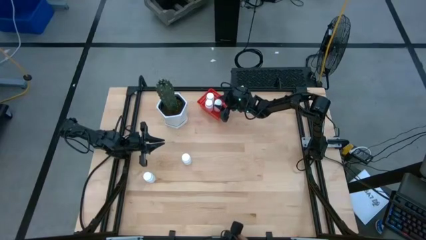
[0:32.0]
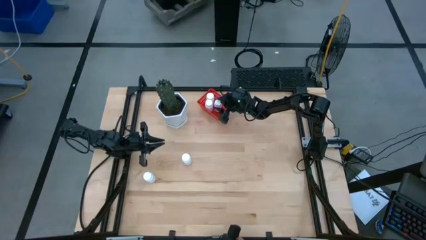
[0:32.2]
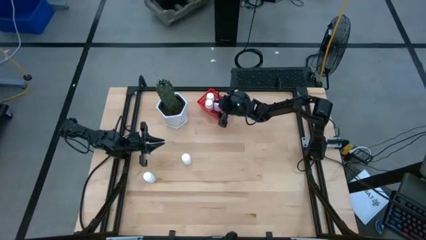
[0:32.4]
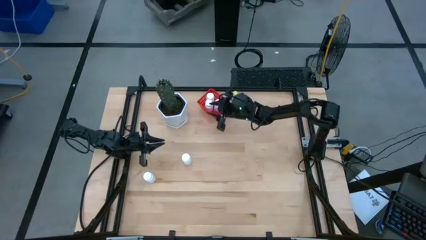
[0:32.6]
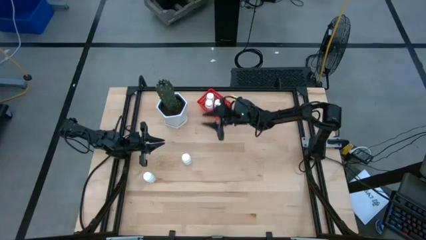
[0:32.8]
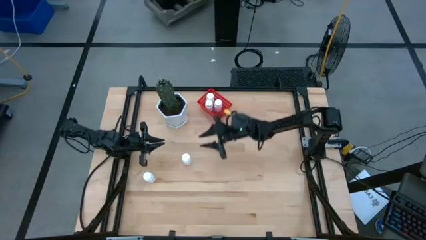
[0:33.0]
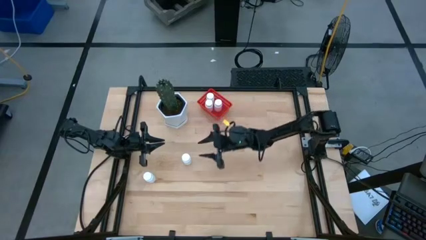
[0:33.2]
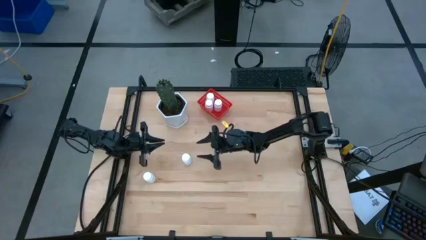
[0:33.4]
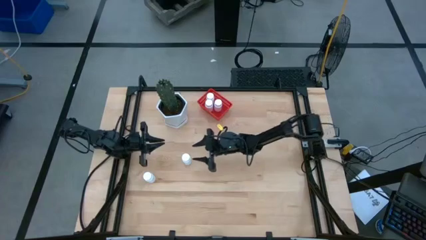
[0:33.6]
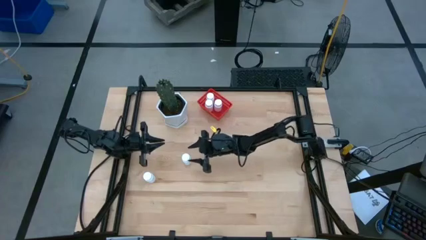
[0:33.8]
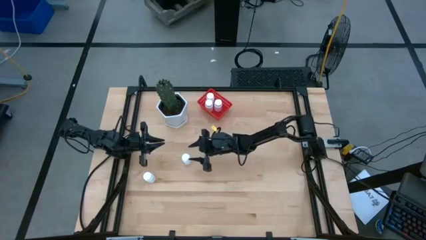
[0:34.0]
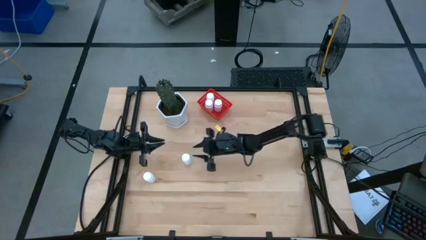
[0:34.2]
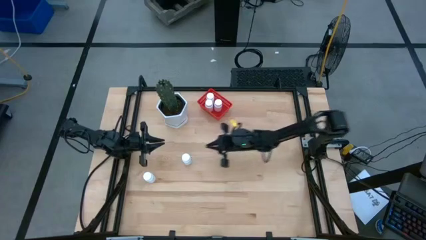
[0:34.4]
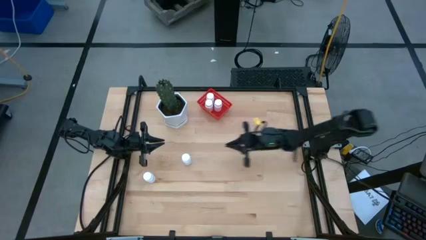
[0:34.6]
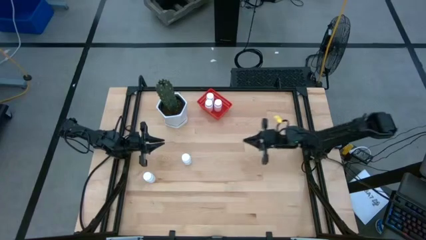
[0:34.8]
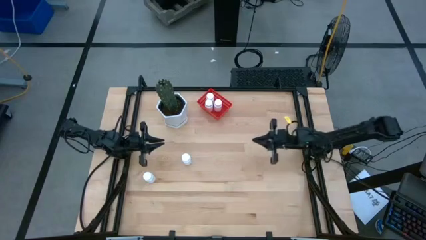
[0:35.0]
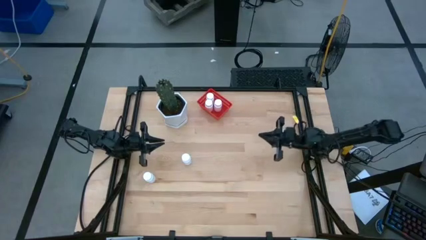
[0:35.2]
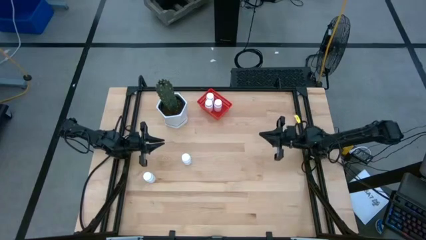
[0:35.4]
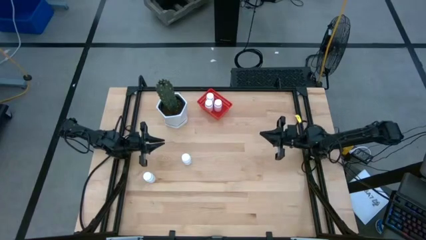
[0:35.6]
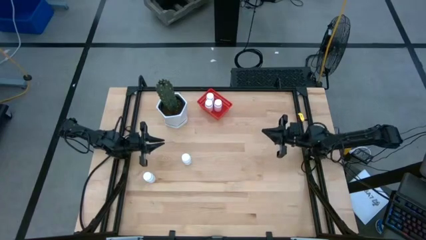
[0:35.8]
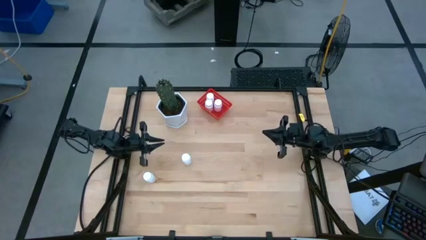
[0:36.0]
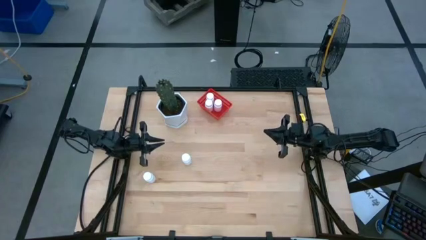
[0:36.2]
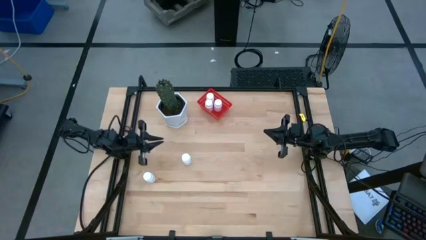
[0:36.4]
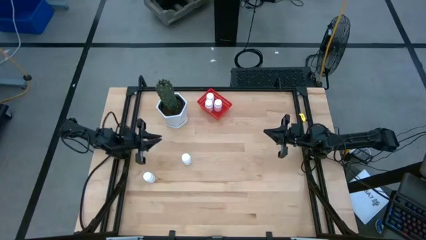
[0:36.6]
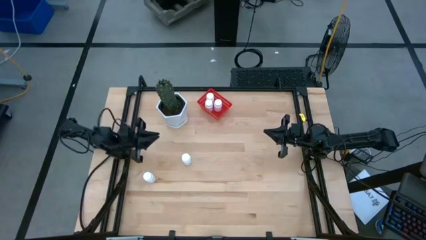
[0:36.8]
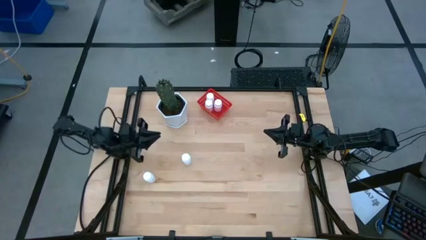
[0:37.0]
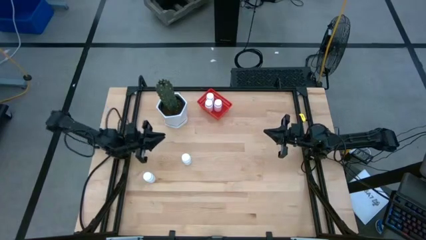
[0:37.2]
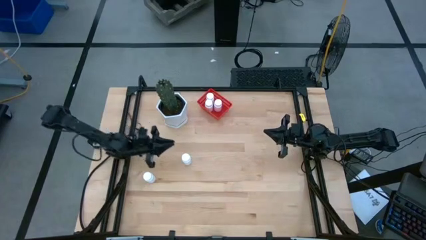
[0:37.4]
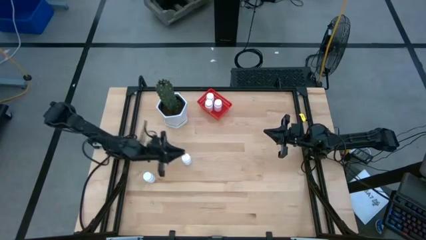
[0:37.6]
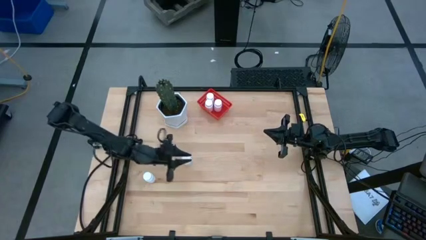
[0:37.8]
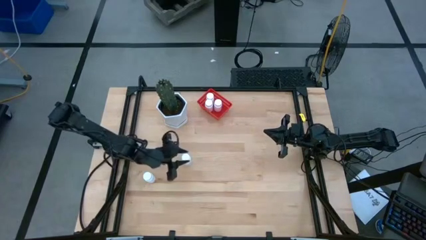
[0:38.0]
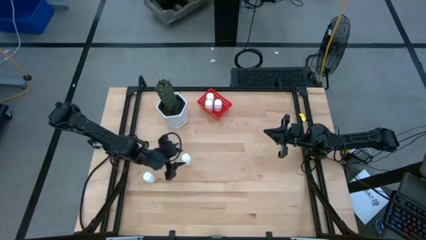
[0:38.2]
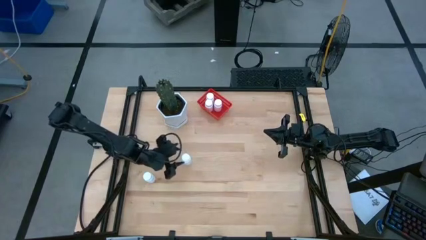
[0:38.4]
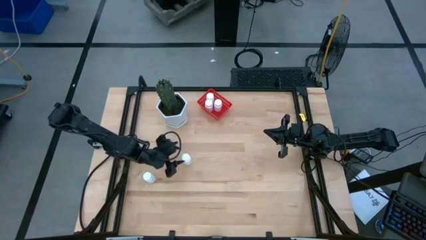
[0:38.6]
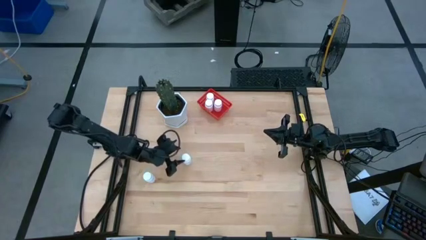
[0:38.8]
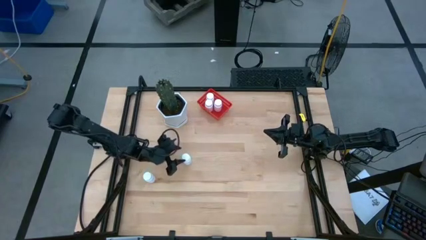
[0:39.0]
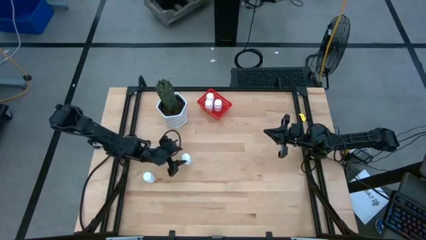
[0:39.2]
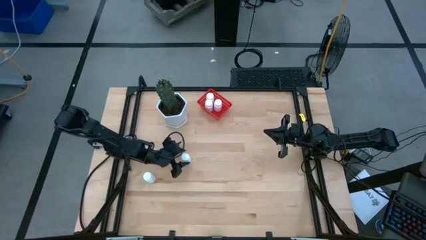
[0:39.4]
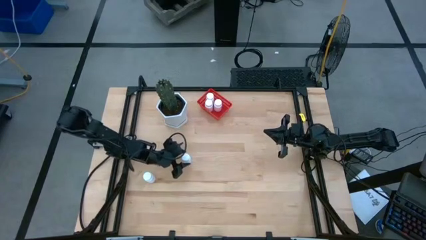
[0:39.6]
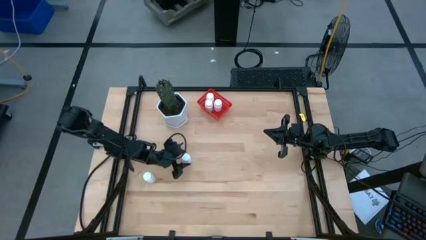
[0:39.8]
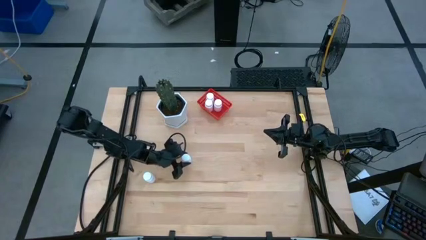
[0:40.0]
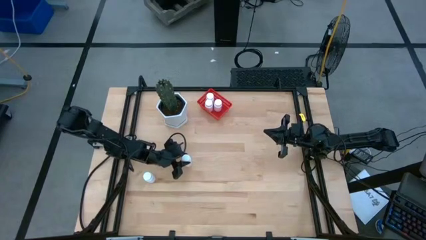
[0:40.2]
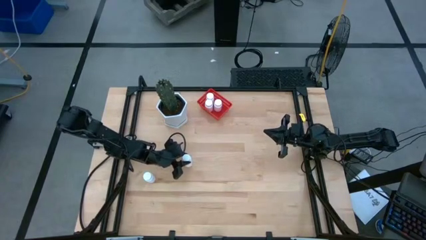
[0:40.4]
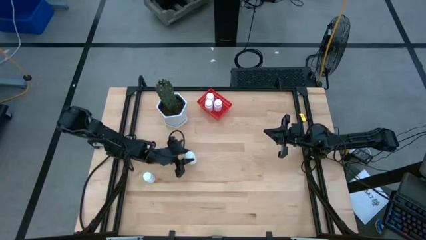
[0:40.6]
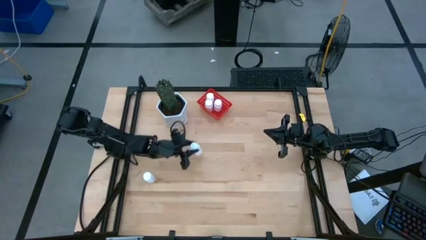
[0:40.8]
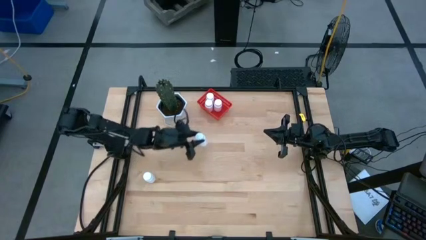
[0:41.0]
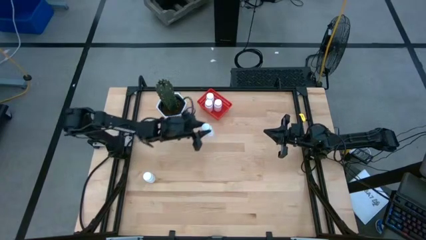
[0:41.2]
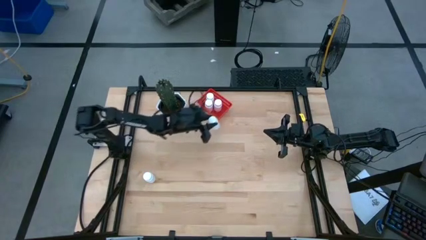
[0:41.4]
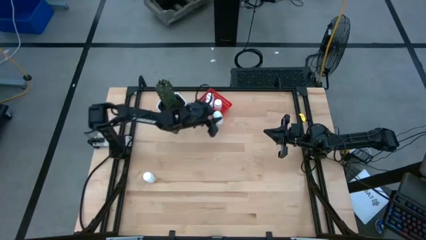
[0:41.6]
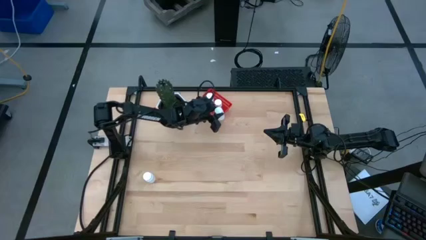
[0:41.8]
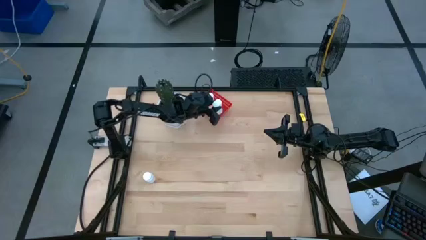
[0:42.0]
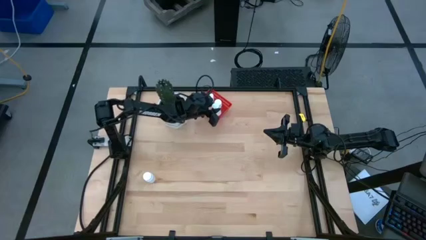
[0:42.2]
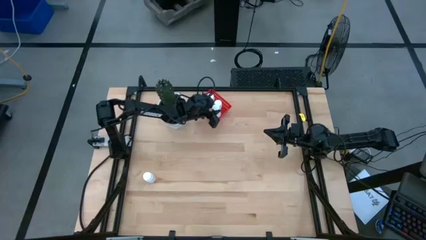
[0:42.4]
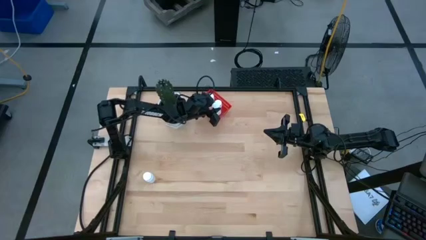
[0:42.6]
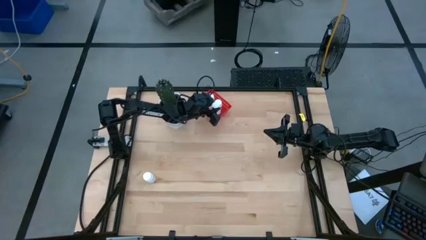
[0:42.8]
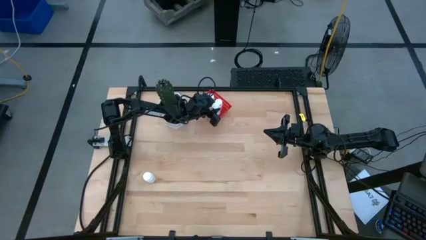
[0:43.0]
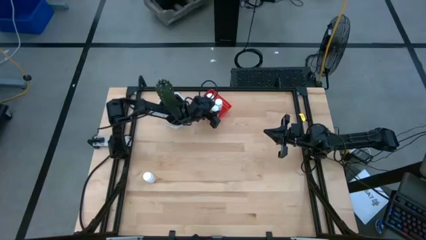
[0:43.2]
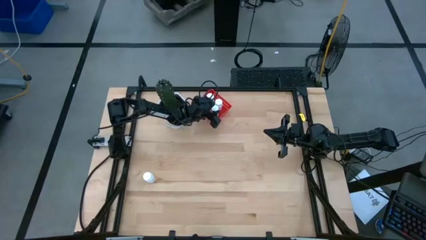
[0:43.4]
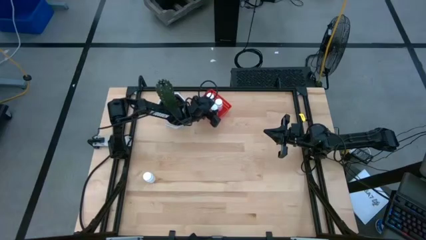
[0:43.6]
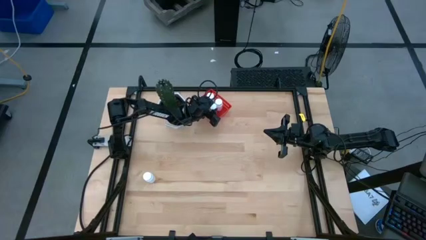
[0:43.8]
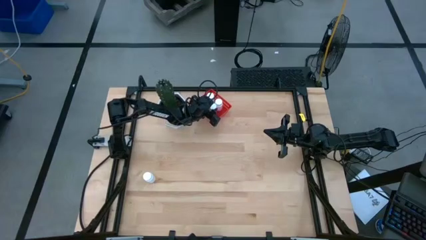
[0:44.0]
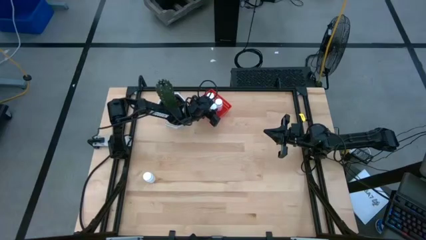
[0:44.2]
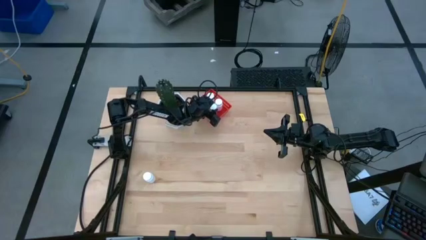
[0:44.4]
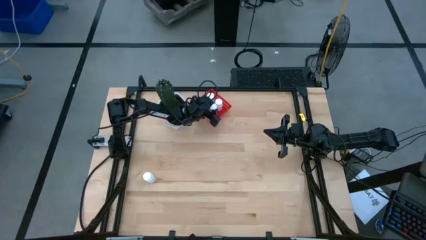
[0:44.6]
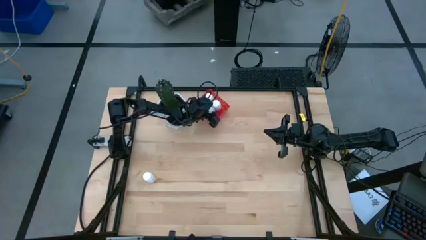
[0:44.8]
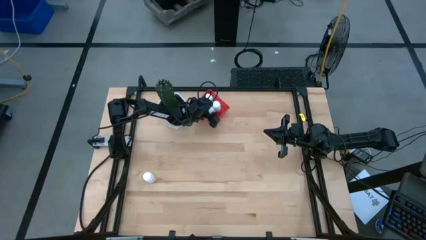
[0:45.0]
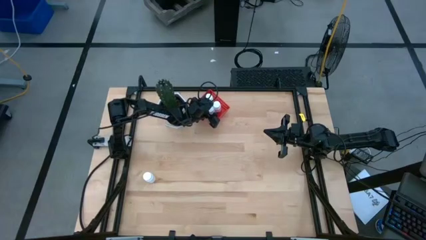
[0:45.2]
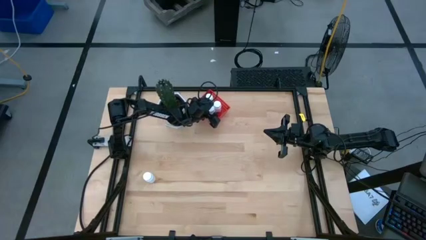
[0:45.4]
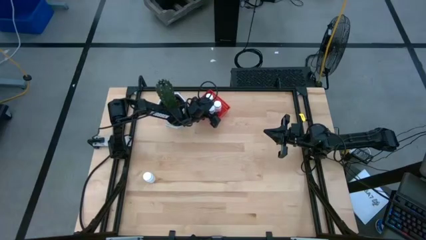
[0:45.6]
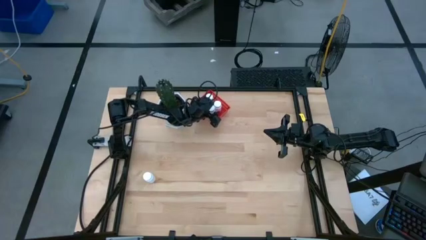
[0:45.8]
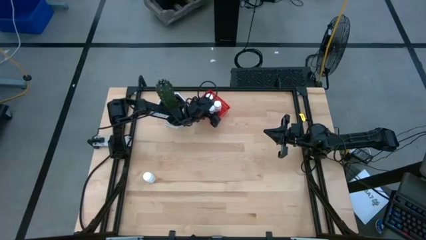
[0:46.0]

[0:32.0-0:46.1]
Task: Pick and place pill bottles into a basket
Put the right white pill bottle into the red bin

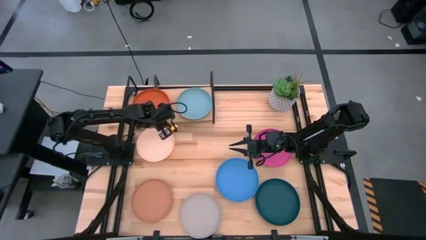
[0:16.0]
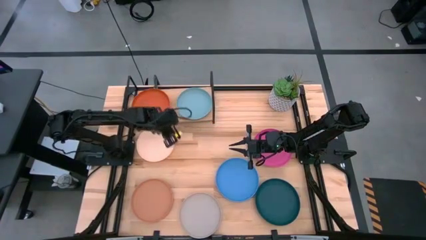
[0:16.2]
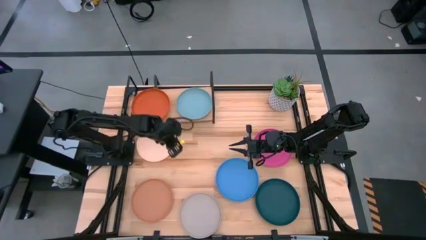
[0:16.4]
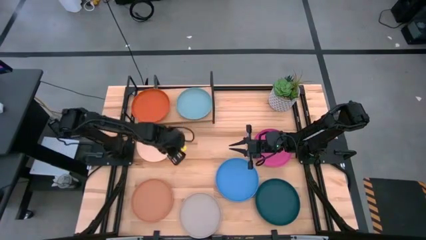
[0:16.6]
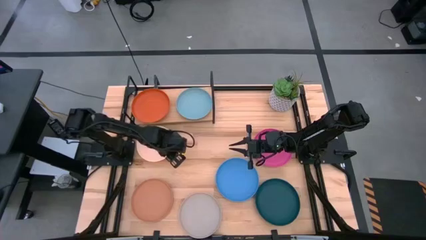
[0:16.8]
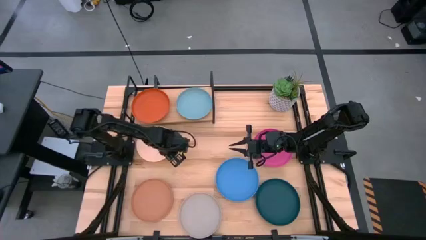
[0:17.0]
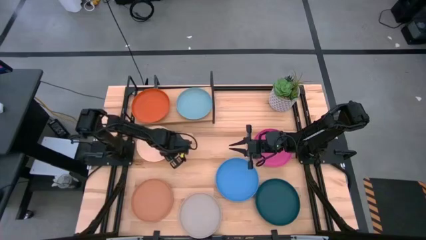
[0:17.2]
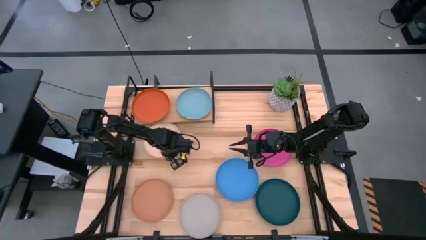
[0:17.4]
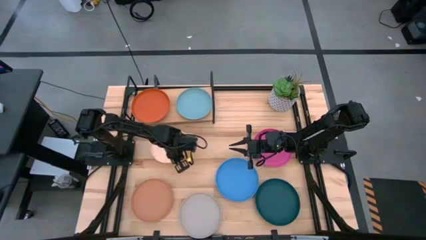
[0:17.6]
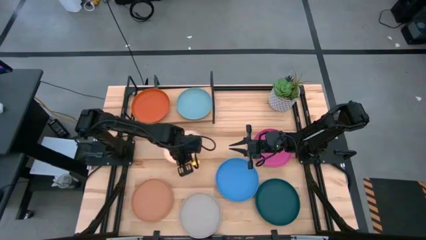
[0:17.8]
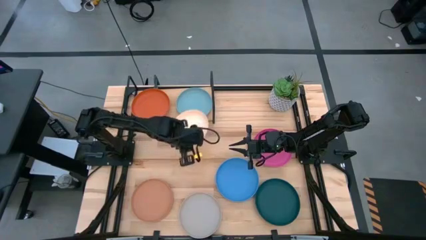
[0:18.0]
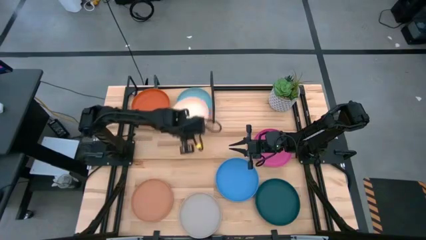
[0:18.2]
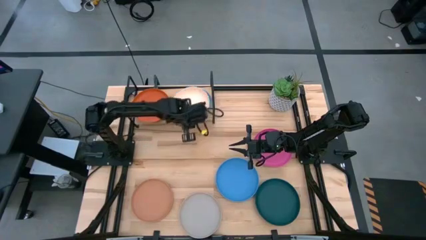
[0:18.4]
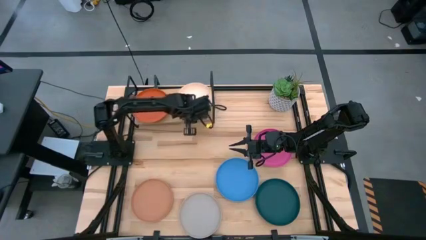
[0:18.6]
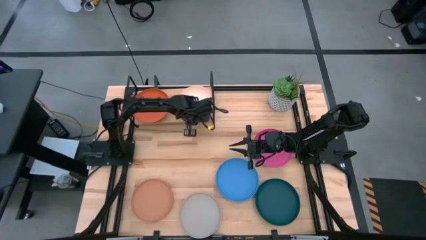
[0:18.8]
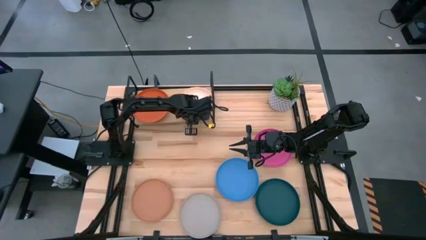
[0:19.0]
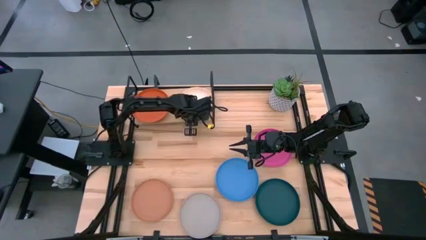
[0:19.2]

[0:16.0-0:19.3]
Task: Place and stack plates onto a shelf
Stack the peach plate on top of the light blue plate on the shelf
